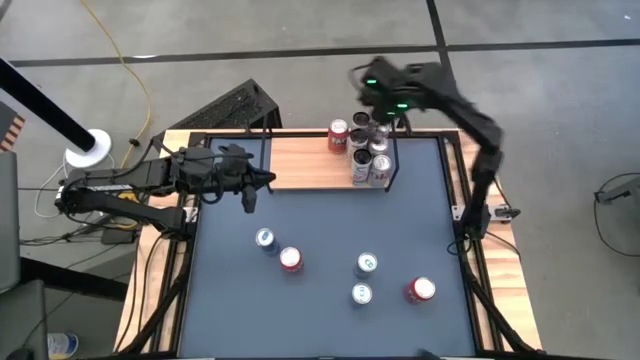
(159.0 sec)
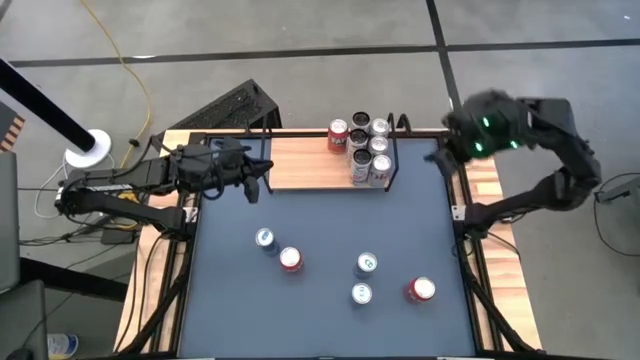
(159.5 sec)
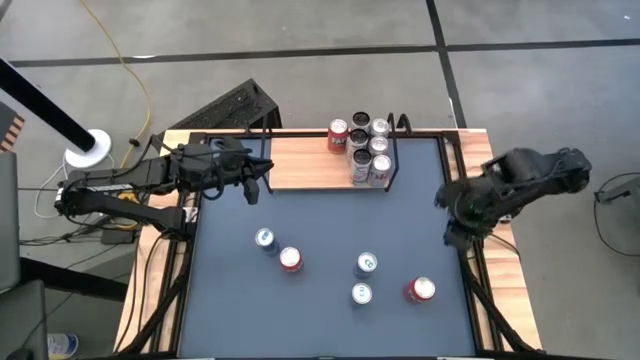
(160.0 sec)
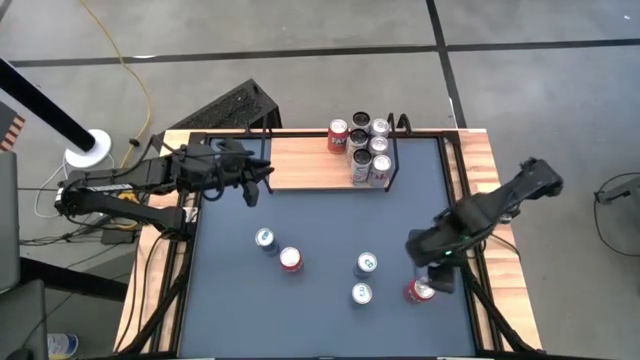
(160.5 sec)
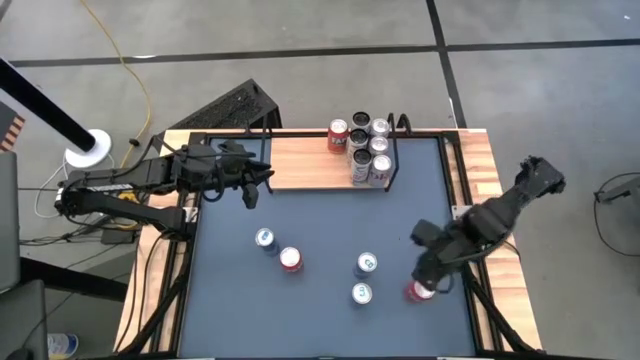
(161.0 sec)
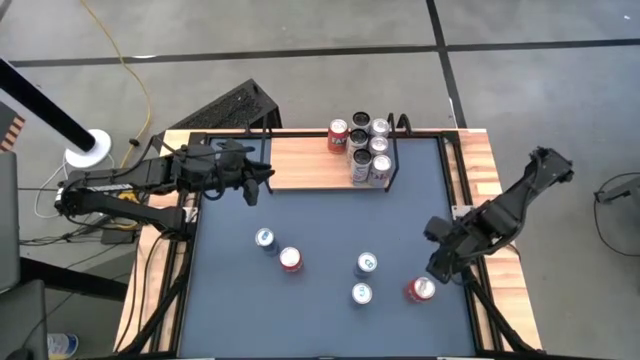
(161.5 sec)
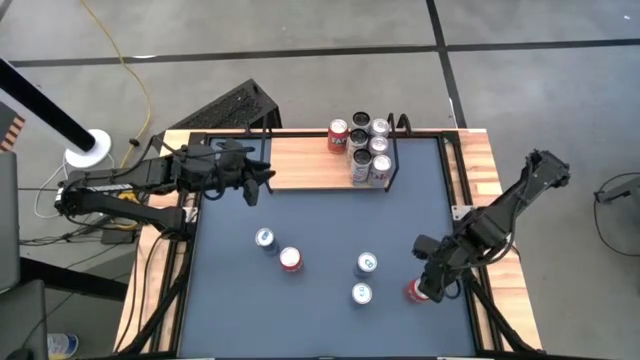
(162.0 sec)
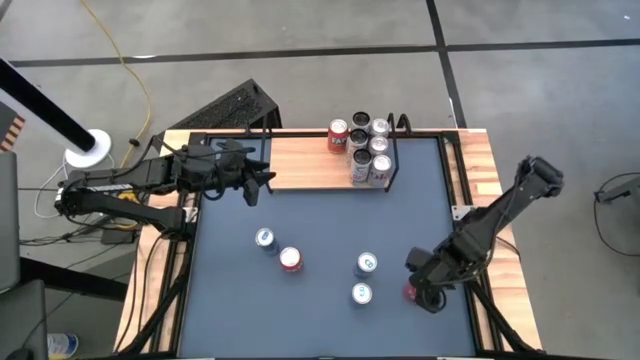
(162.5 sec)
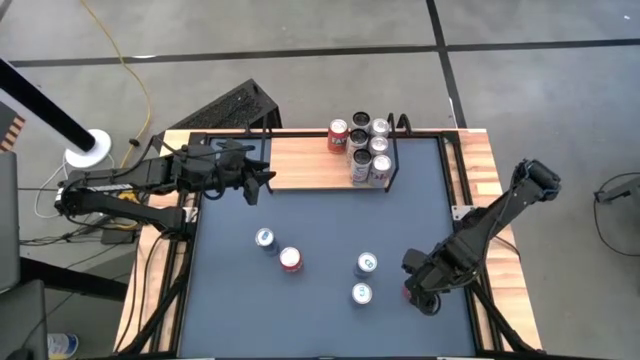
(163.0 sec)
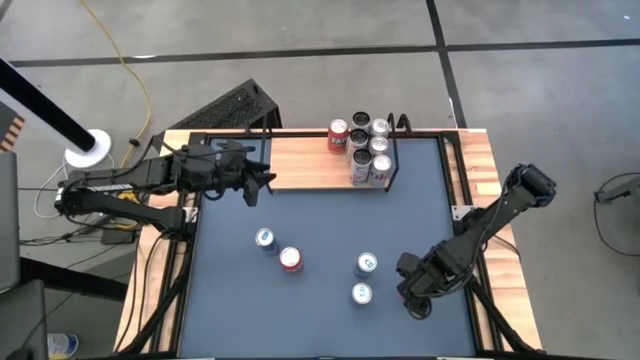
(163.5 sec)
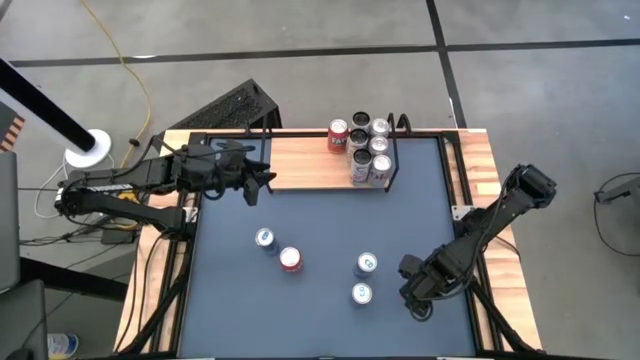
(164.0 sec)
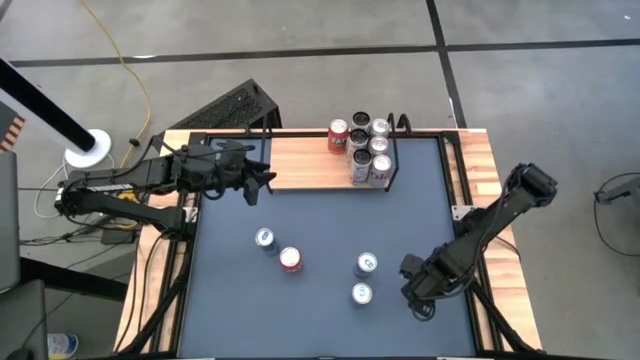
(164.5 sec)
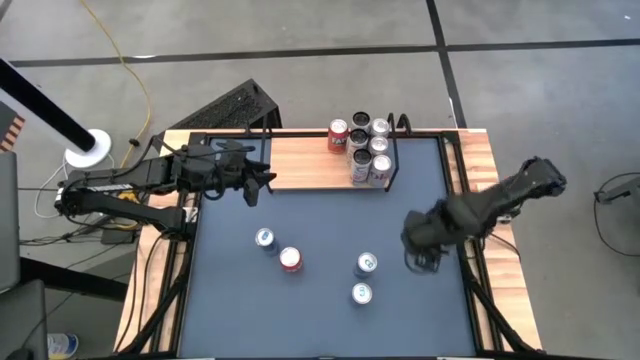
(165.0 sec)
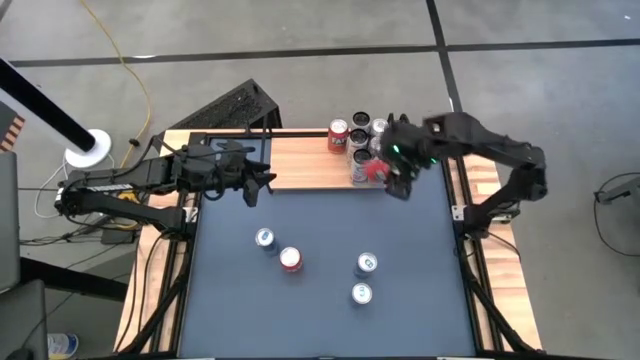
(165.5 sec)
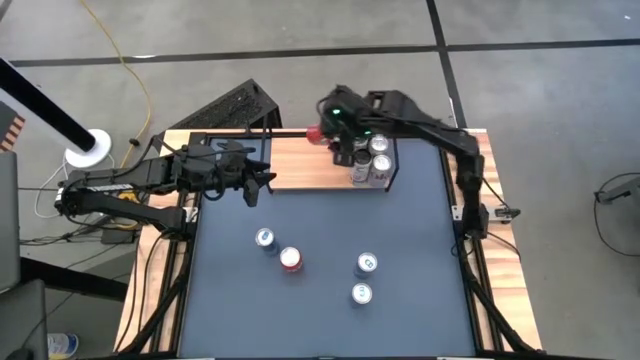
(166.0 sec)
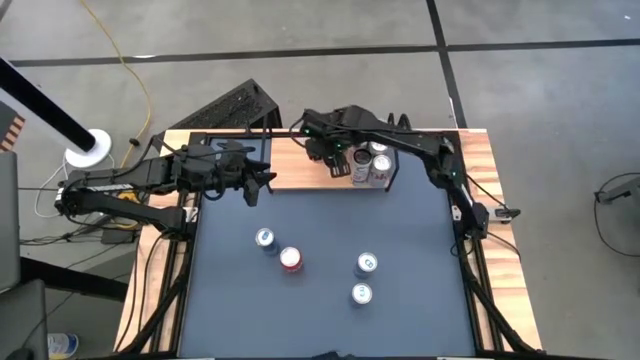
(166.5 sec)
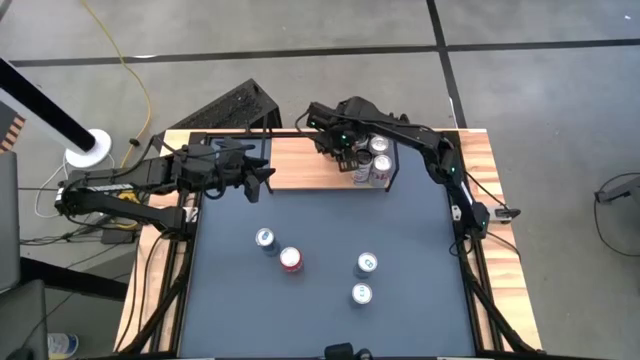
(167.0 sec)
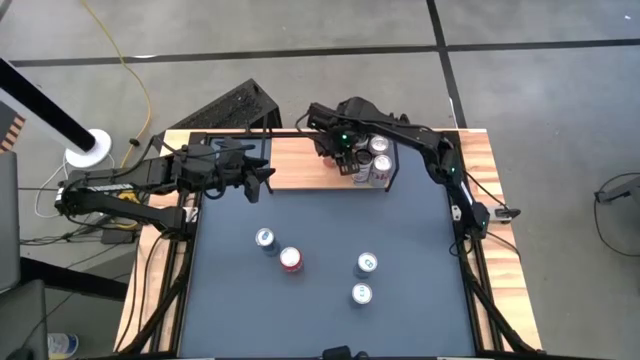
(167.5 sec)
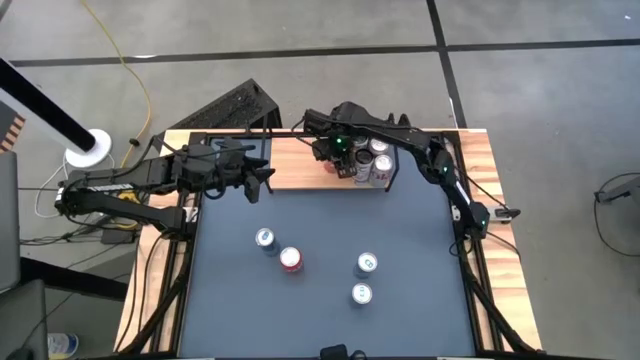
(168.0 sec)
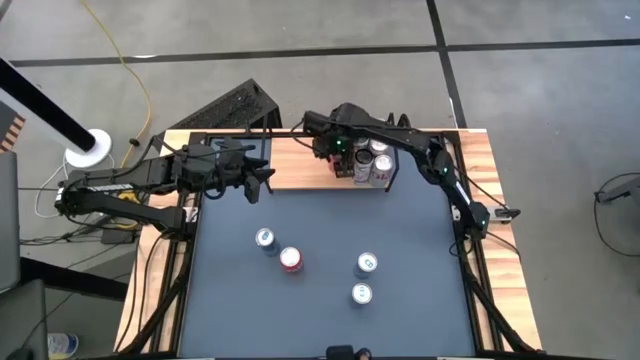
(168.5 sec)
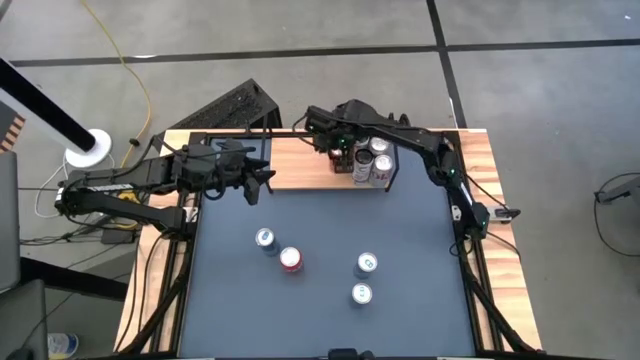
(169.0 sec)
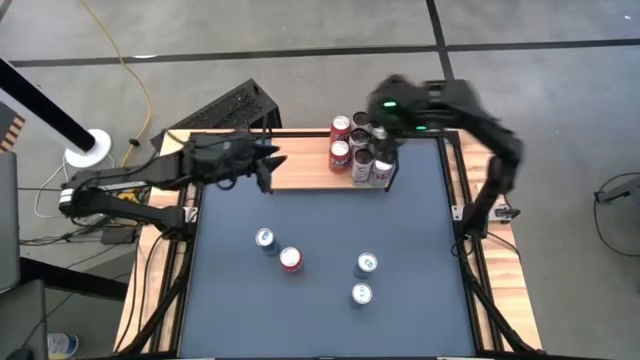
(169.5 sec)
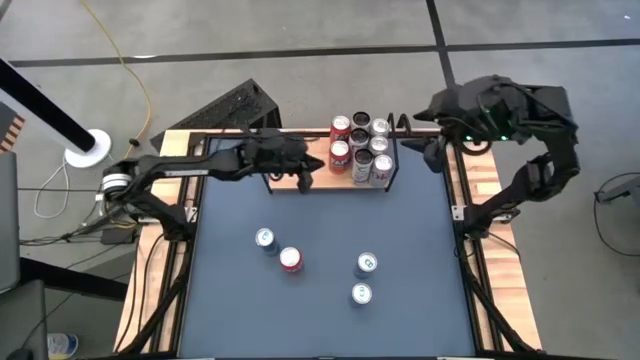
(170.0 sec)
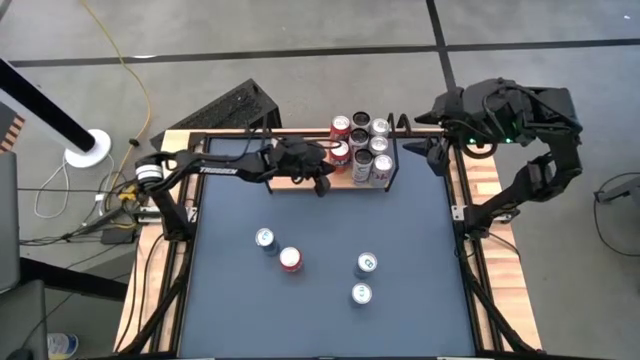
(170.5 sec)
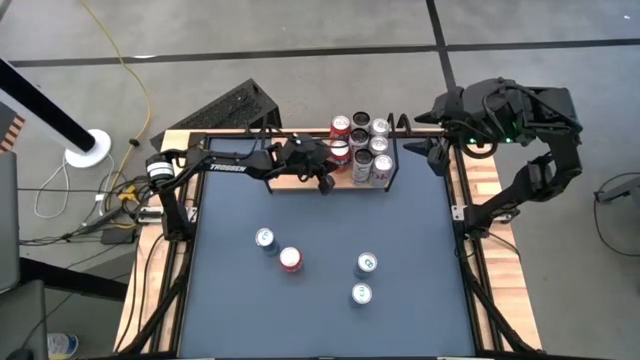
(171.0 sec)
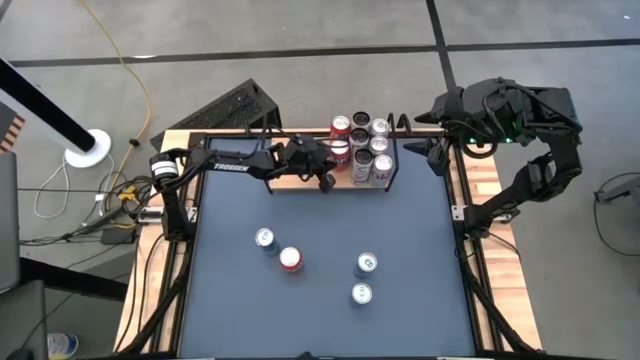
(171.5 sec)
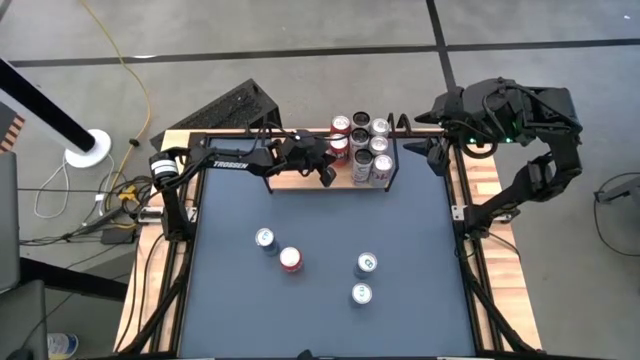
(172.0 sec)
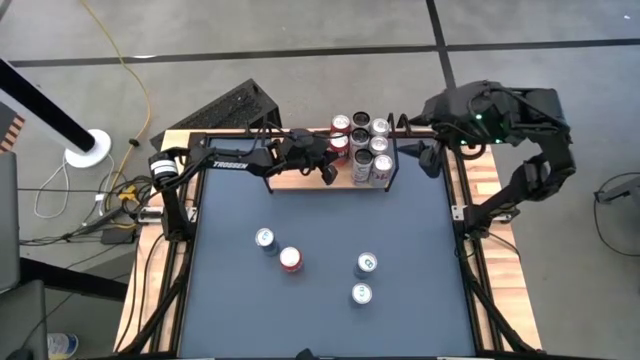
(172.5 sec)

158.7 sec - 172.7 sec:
Task: Place canned beverage on shelf
Put the right red soda can on the shelf aligned with the other red soda can

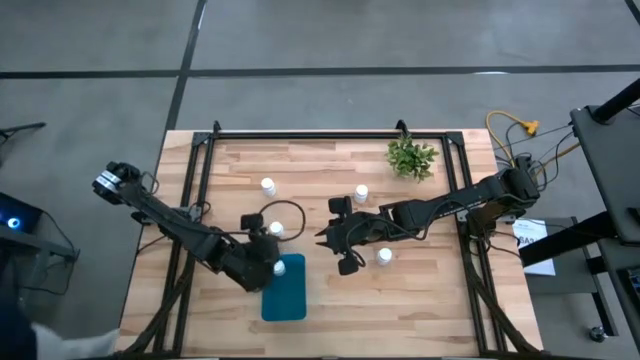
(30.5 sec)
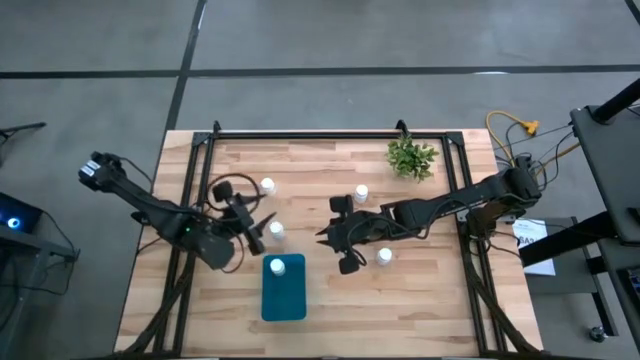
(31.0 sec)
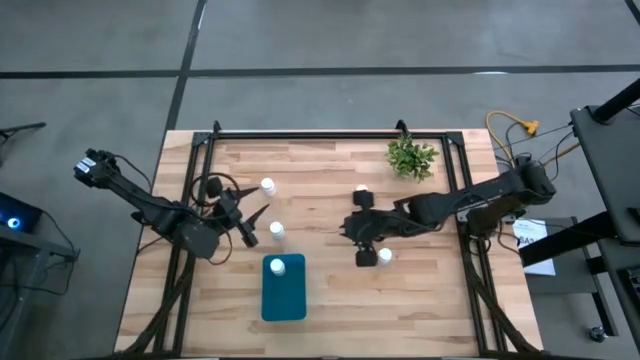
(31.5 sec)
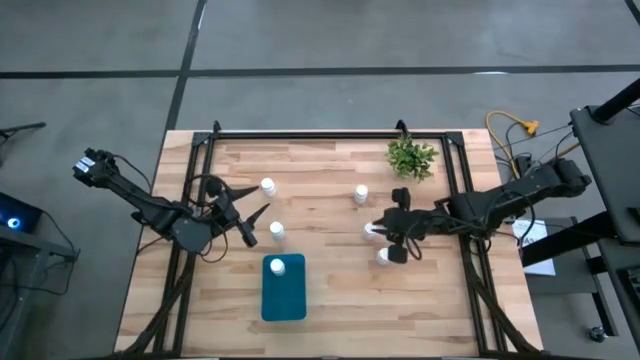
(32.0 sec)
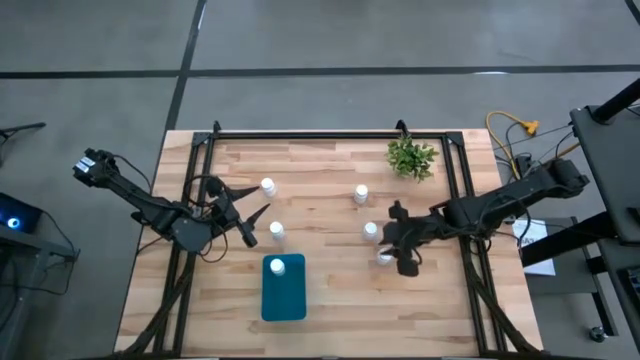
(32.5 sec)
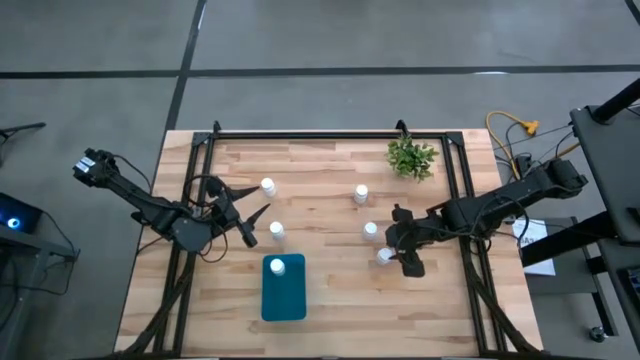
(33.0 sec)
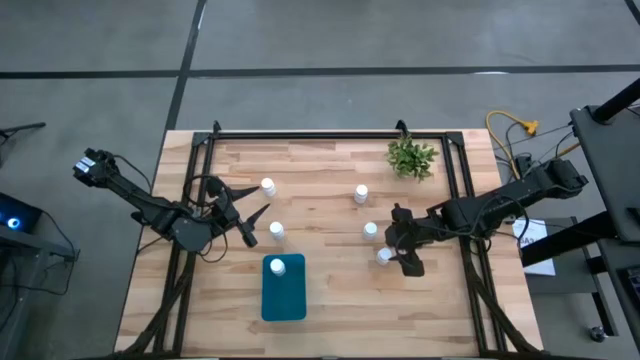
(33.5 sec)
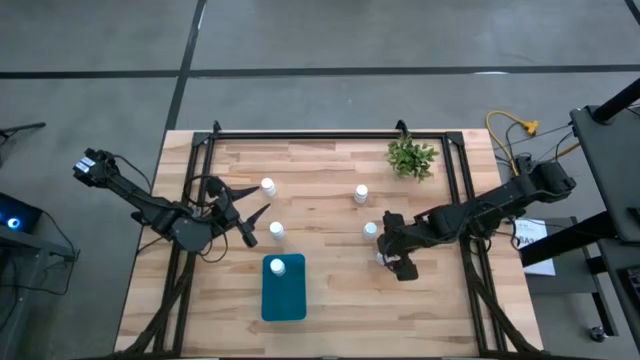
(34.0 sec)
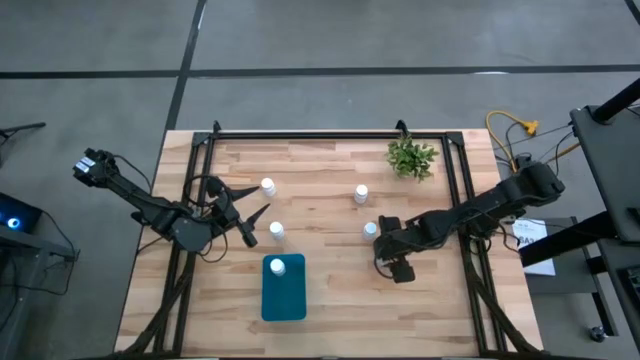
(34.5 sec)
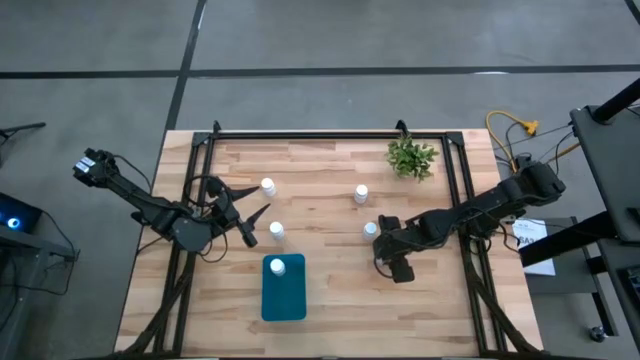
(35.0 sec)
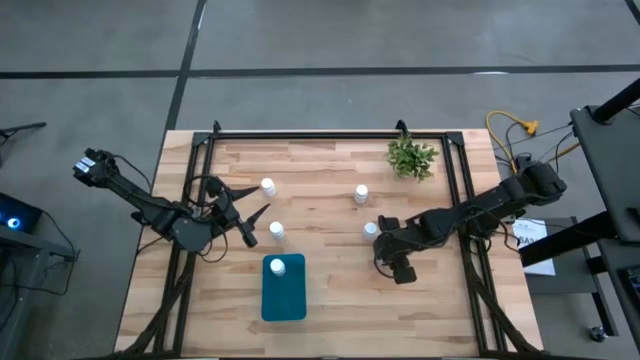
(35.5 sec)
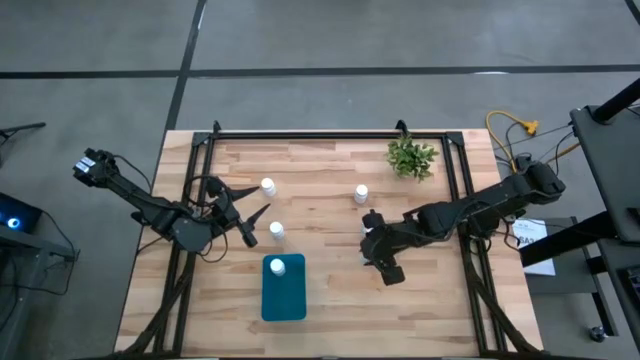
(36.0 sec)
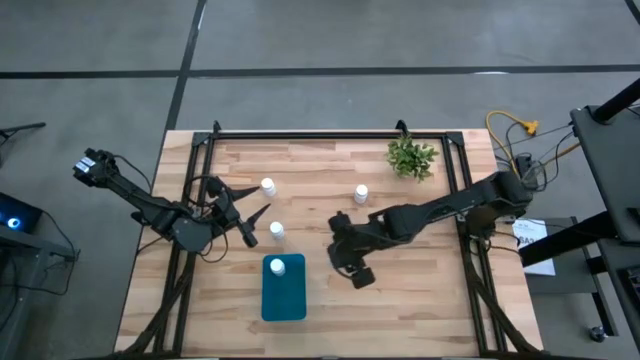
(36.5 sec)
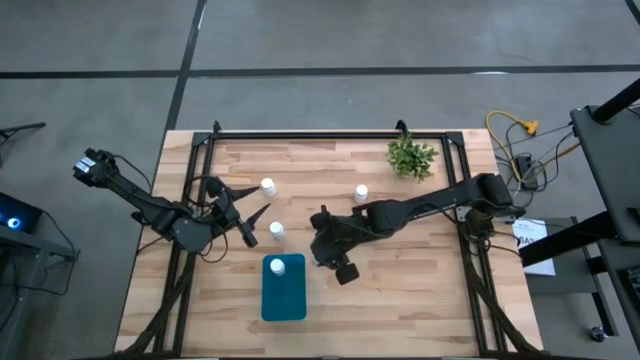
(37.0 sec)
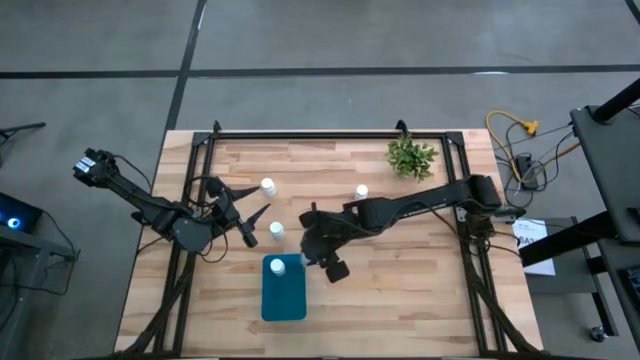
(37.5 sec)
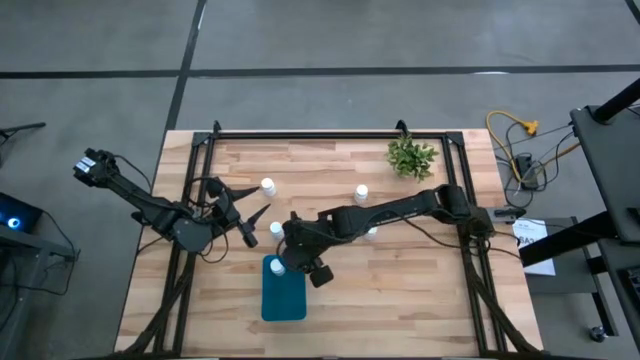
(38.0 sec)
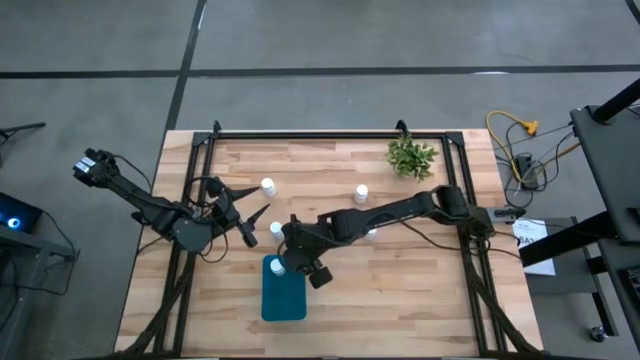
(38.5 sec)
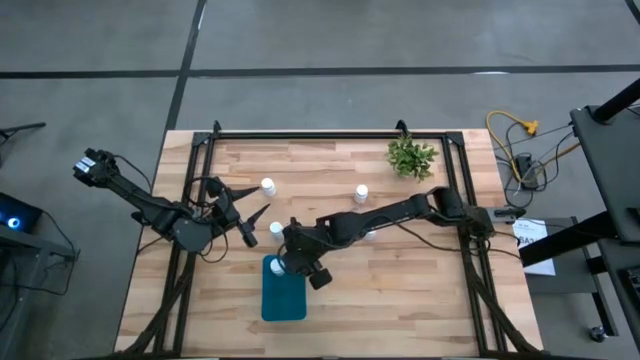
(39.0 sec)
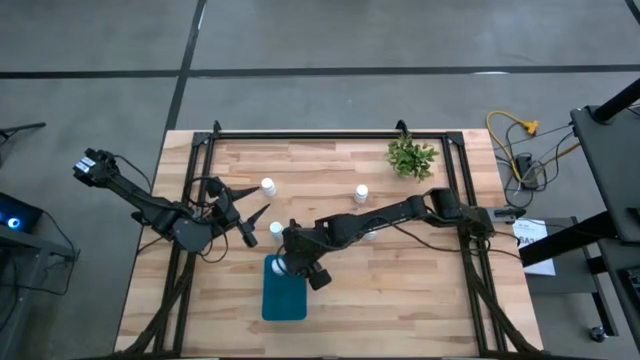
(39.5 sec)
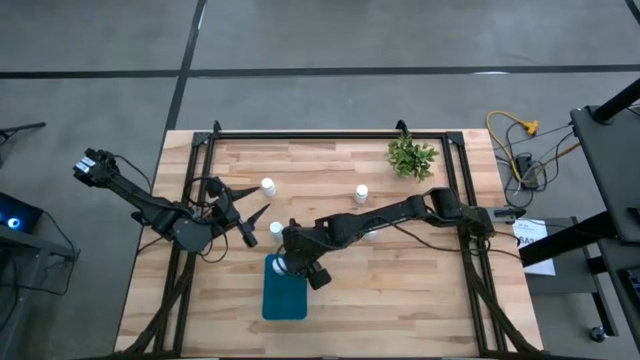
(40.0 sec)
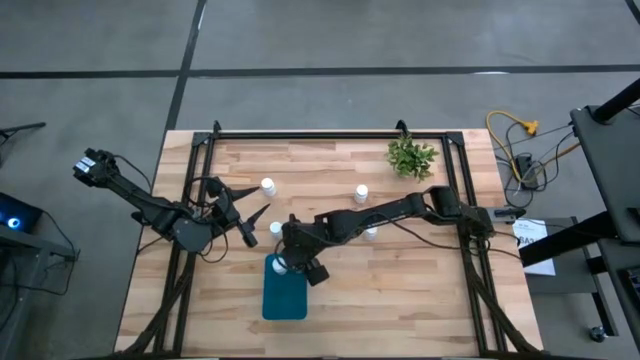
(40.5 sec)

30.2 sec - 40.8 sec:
Task: Pick and place pill bottles into a basket
Put the white pill bottle into the blue bin
